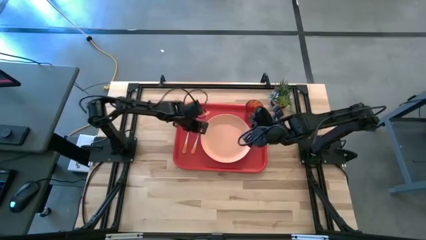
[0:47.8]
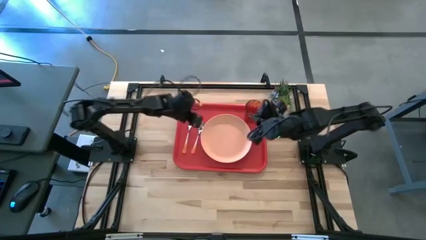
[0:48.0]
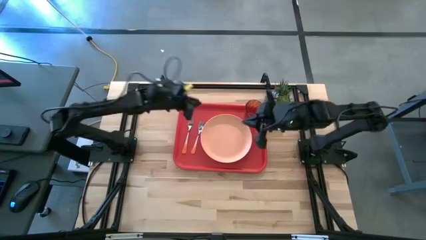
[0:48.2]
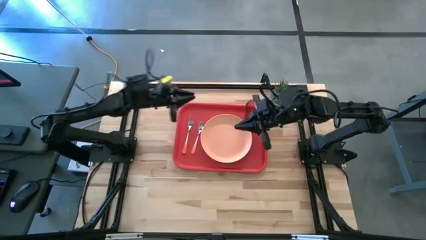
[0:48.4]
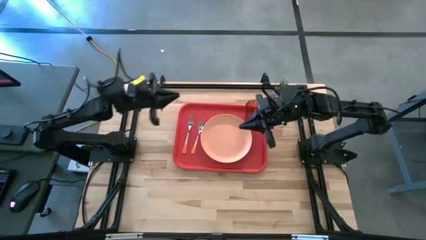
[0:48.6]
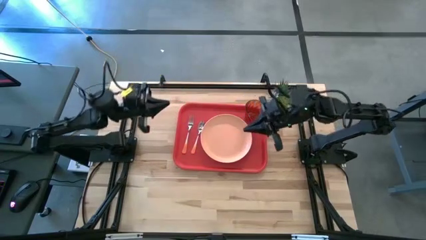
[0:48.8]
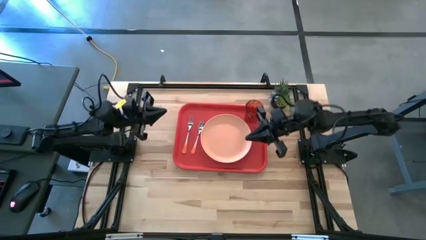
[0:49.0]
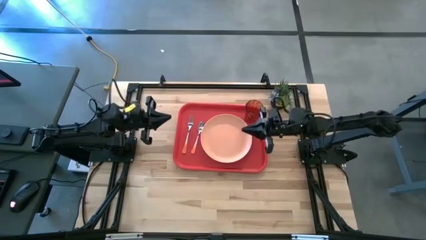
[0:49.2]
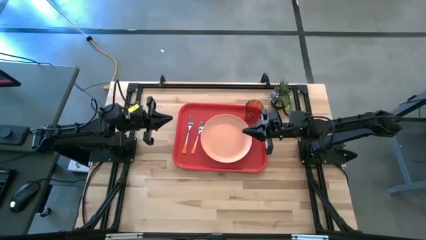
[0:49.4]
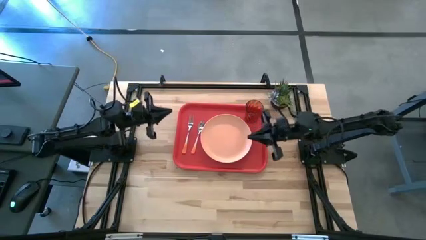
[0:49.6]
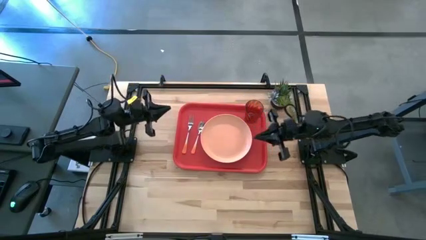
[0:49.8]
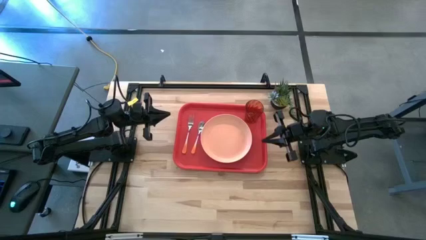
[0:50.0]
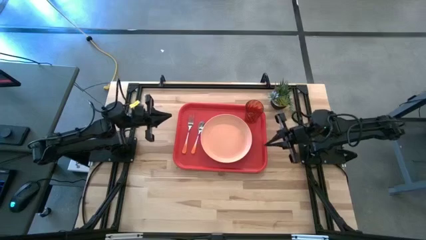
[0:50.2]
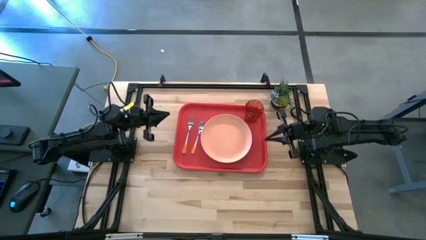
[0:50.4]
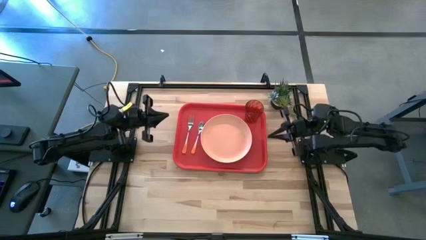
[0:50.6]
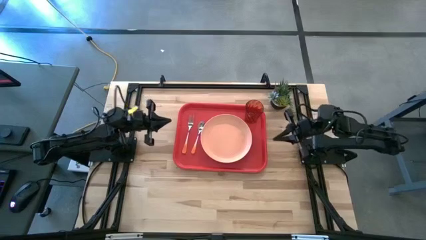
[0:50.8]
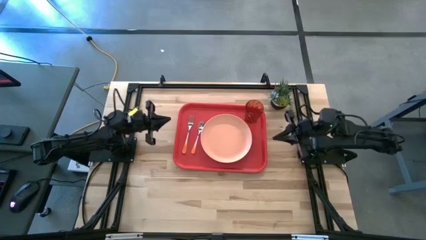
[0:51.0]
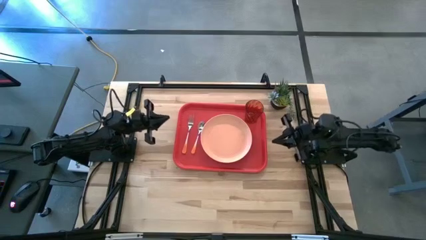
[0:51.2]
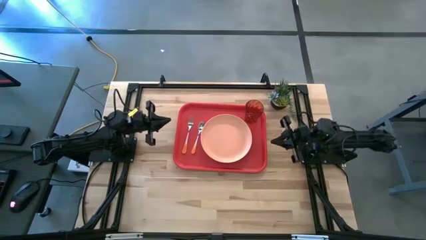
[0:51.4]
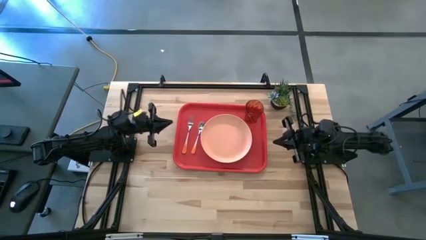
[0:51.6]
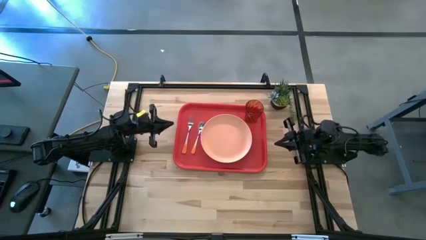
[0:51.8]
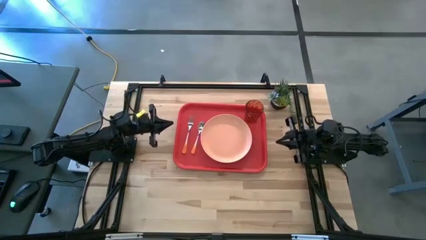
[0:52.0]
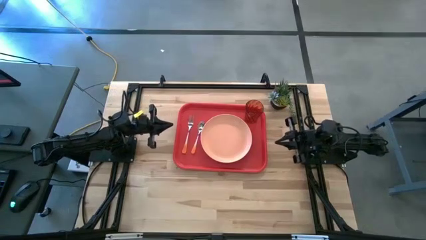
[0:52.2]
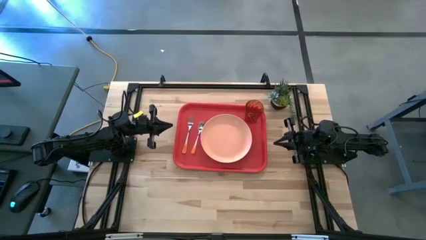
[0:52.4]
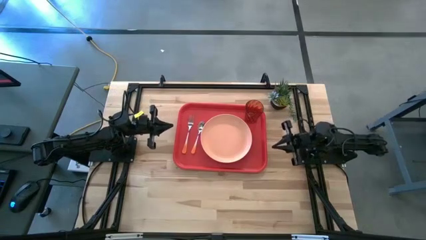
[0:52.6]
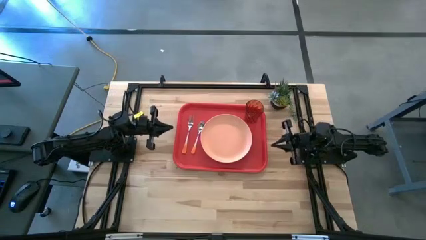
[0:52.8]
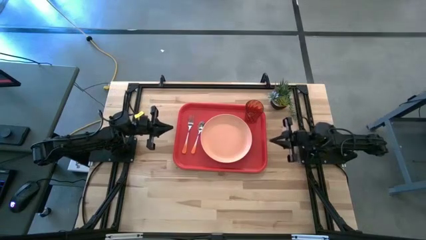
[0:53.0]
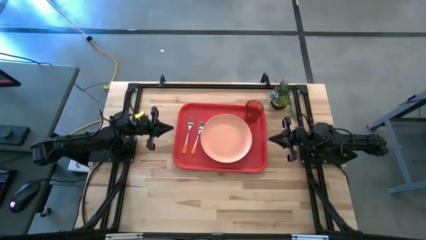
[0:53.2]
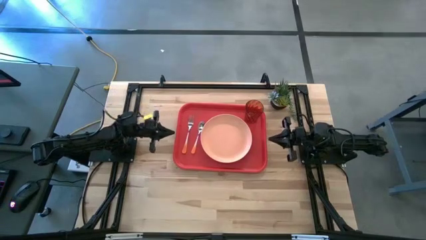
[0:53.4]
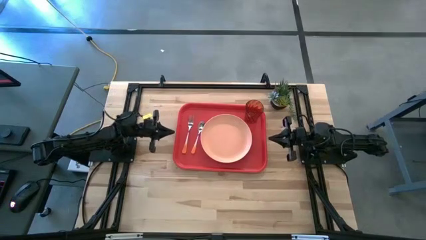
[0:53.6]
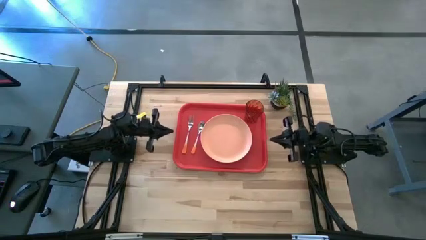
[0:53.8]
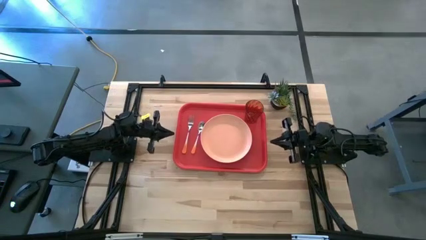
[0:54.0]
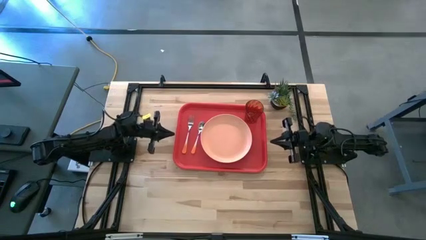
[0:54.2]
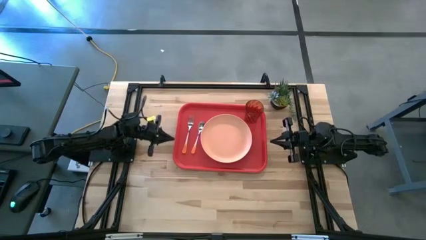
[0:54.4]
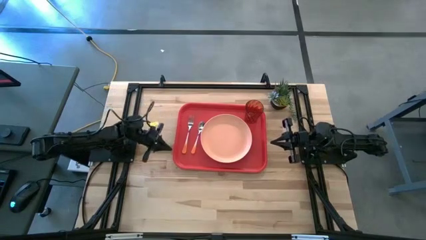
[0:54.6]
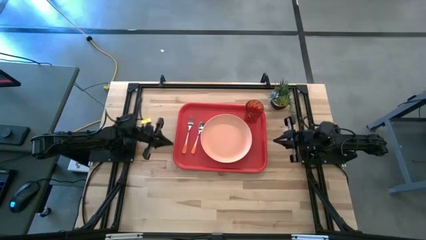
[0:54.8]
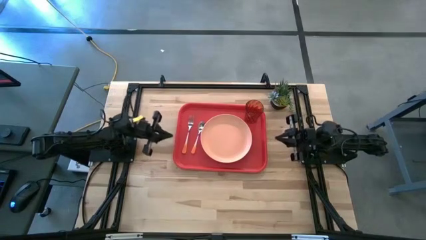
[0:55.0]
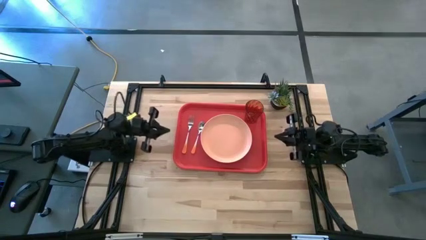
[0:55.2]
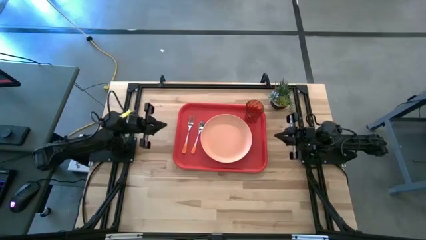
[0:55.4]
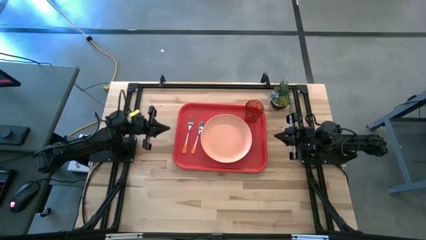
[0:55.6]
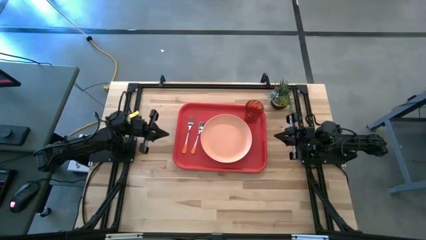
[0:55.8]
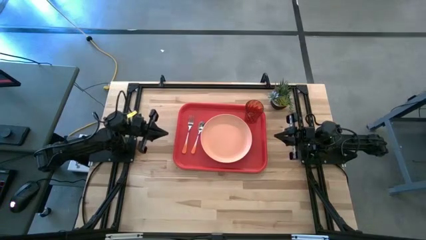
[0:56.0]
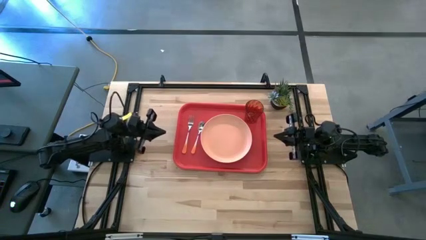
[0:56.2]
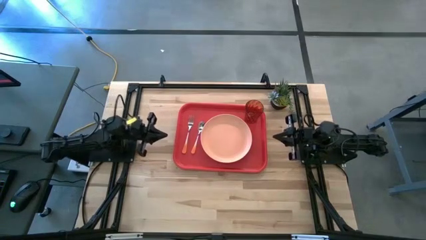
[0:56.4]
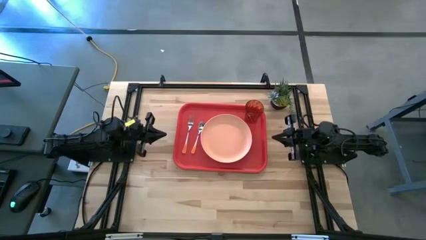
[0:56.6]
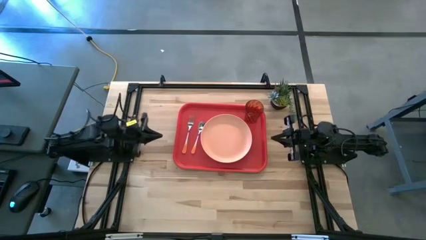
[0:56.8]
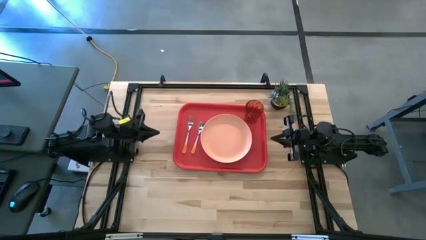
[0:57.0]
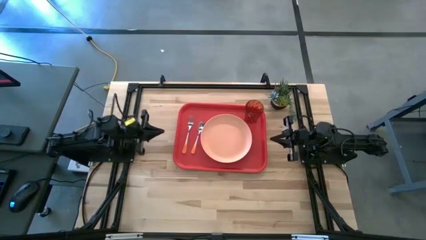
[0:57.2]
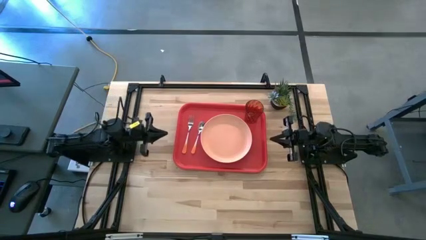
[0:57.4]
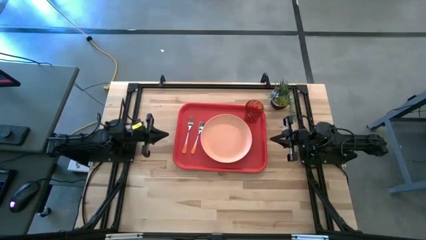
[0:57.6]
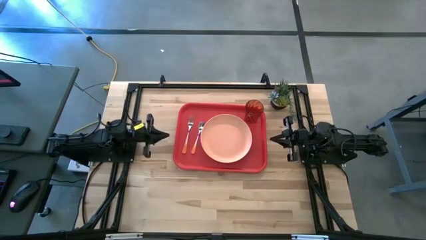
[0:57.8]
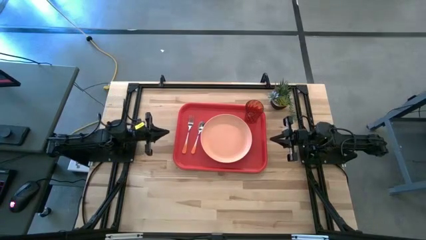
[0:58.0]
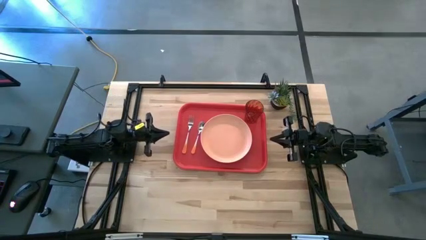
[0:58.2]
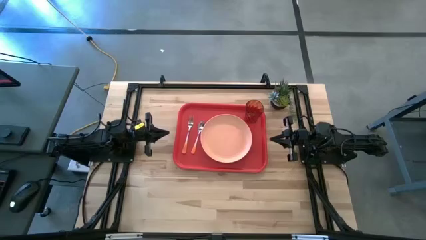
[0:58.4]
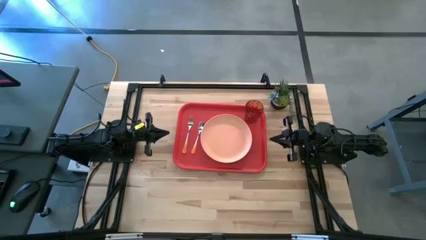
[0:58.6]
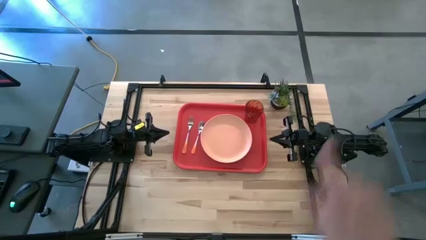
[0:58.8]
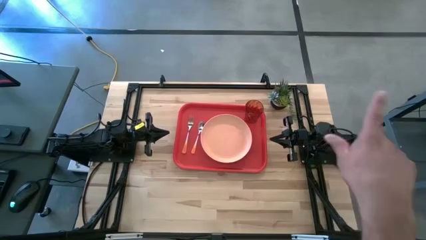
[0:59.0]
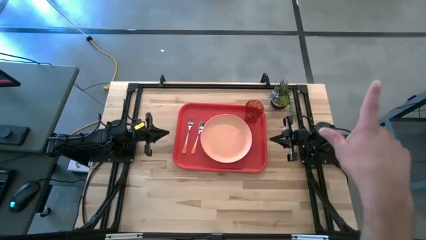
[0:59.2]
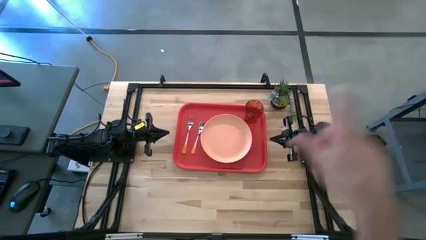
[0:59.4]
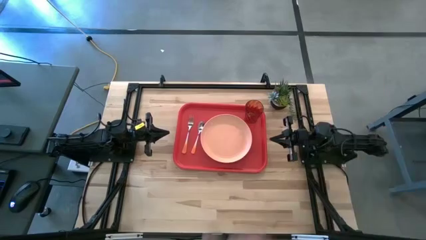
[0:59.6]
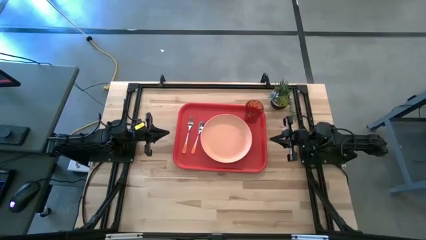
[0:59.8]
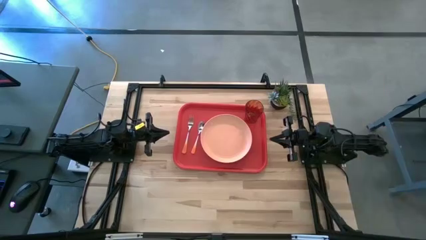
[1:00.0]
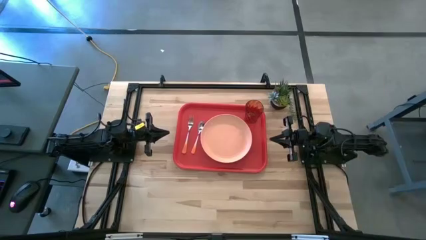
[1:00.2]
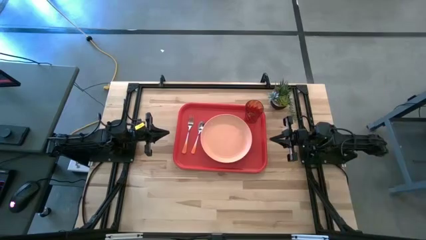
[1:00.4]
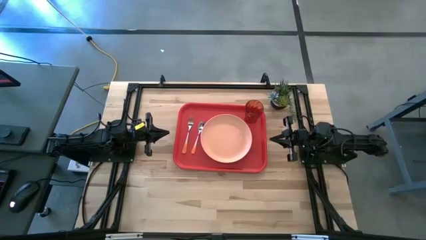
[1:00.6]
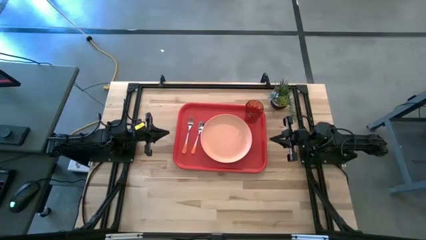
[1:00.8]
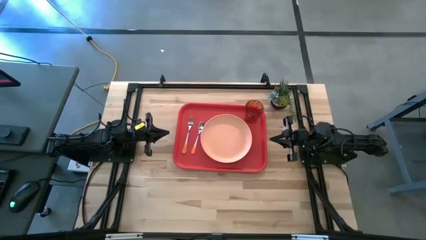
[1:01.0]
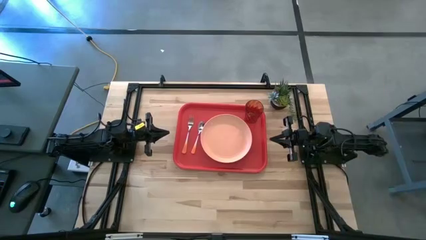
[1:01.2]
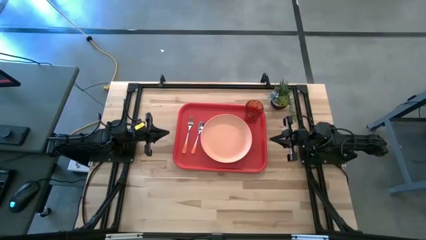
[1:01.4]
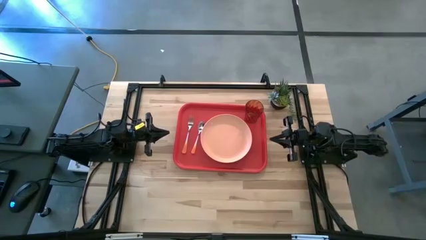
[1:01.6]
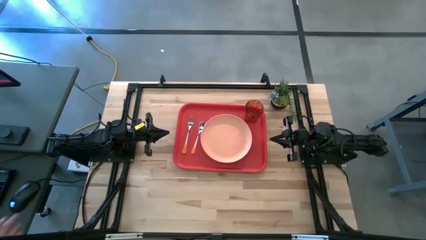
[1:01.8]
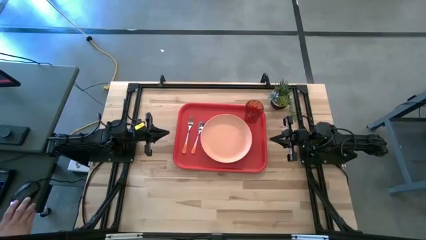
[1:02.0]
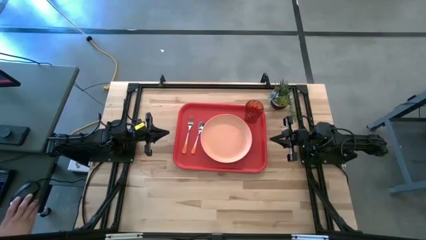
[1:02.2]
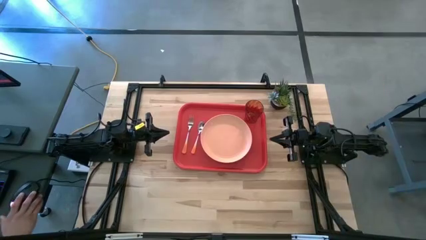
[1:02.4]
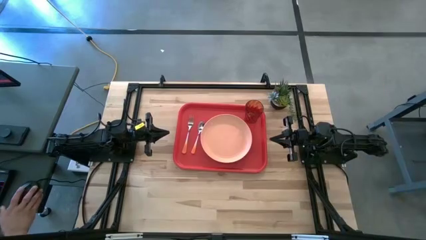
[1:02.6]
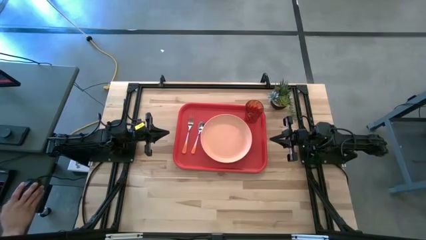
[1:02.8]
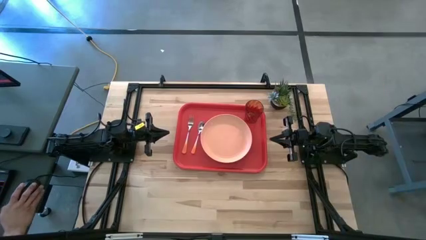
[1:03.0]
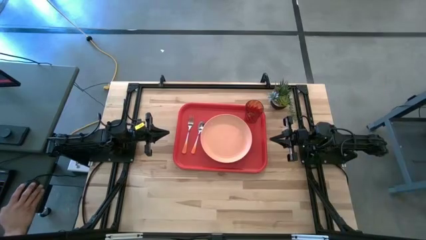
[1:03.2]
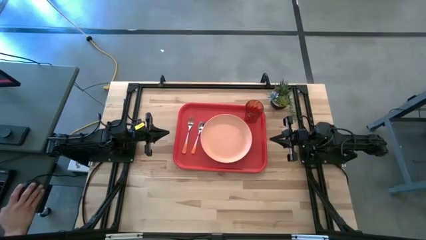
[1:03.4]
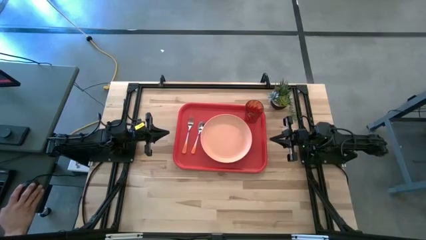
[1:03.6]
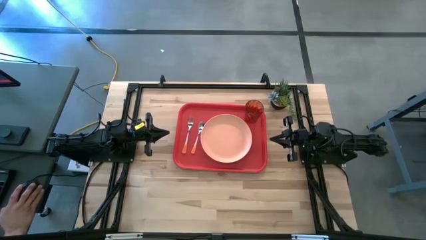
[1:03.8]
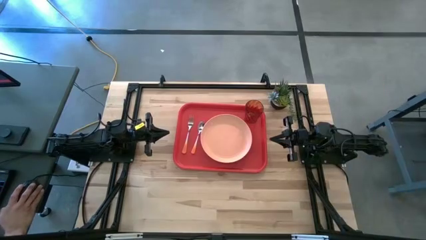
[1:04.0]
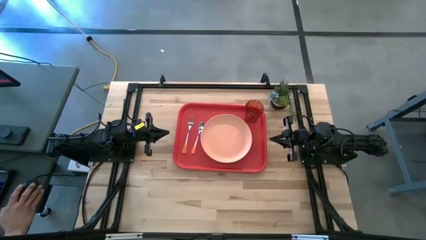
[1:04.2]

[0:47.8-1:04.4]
Task: Pick and place plate/cup/fork/spoon on tray
Return to Home Position
